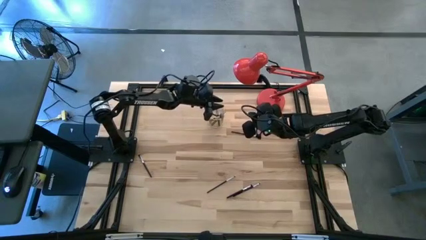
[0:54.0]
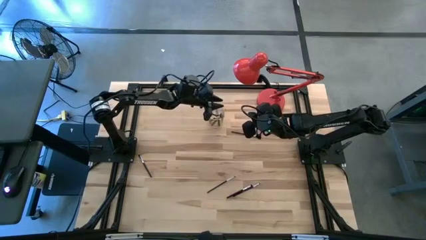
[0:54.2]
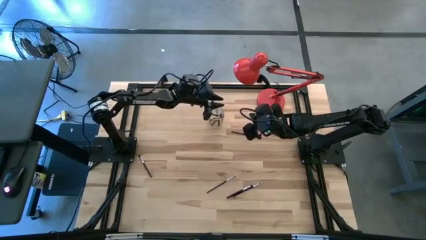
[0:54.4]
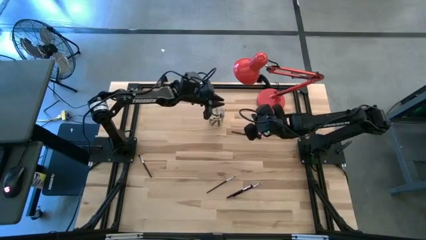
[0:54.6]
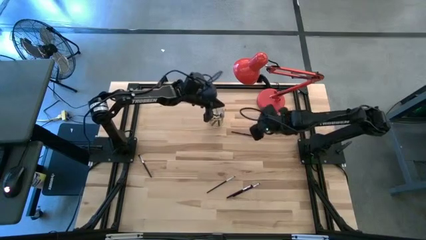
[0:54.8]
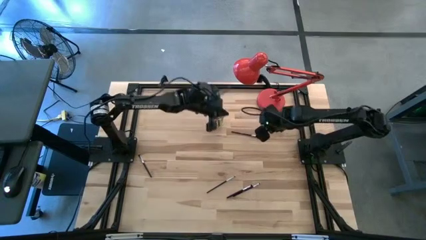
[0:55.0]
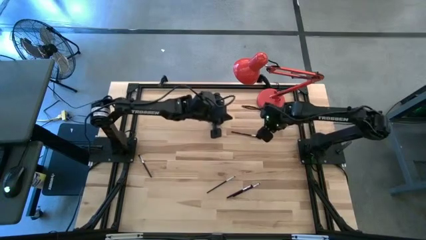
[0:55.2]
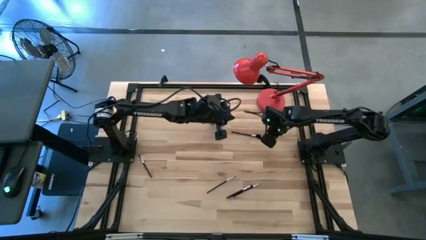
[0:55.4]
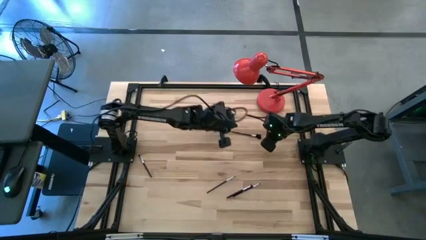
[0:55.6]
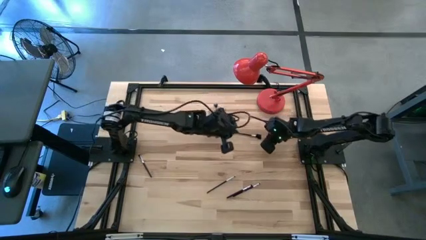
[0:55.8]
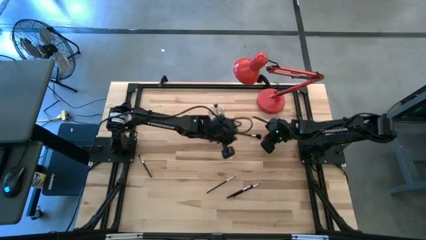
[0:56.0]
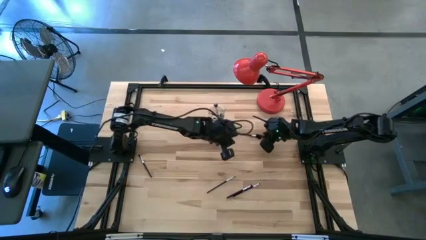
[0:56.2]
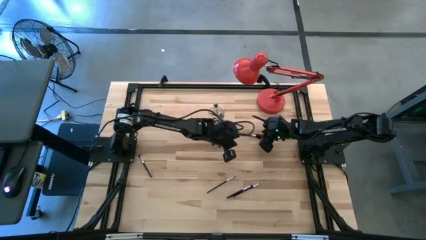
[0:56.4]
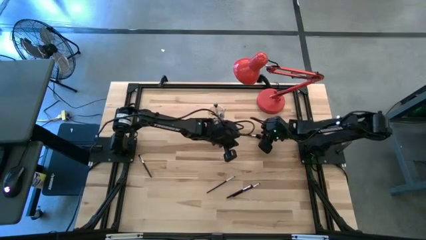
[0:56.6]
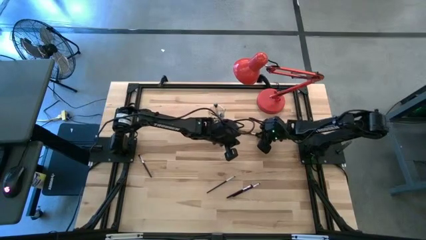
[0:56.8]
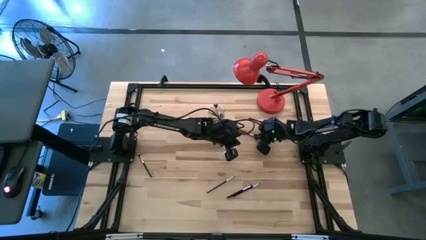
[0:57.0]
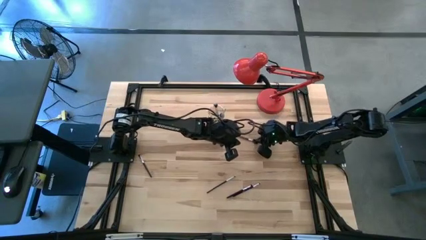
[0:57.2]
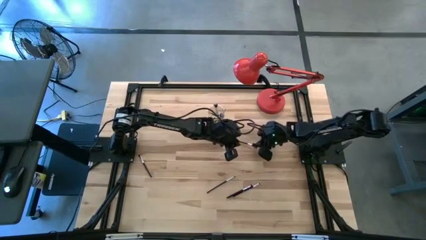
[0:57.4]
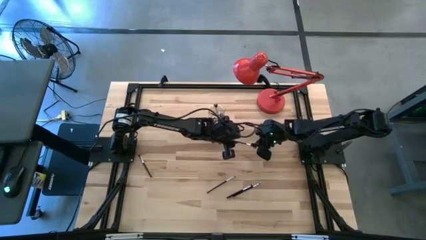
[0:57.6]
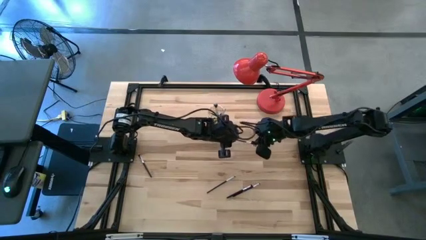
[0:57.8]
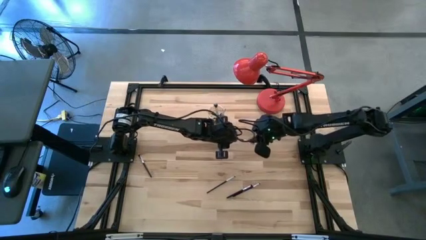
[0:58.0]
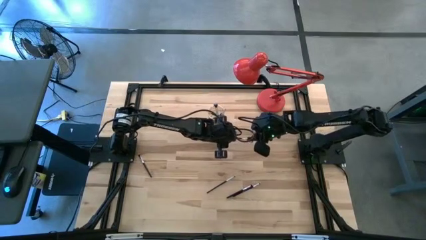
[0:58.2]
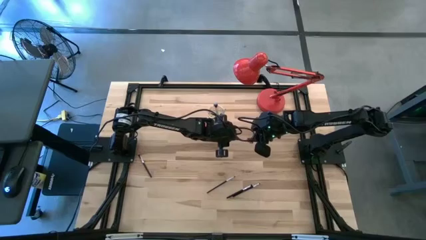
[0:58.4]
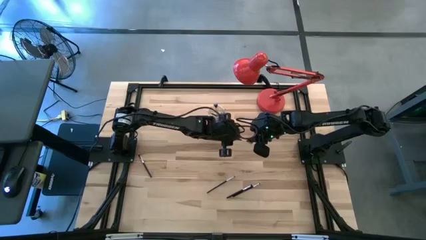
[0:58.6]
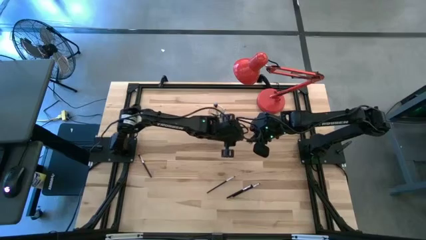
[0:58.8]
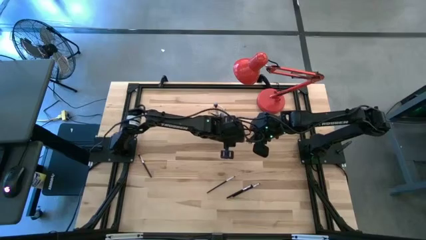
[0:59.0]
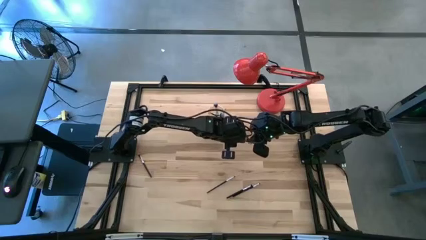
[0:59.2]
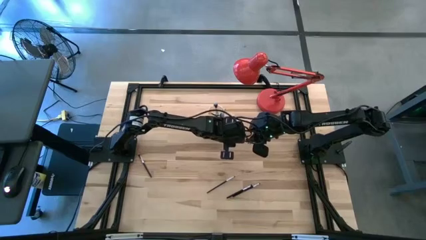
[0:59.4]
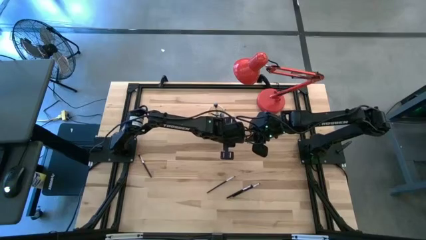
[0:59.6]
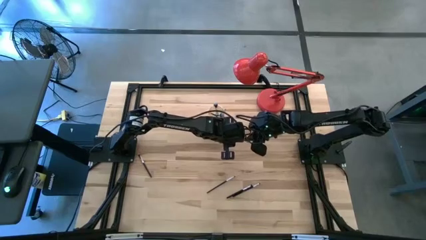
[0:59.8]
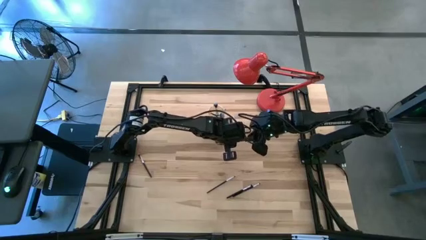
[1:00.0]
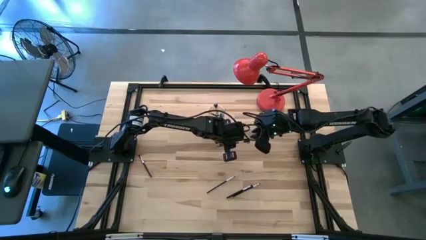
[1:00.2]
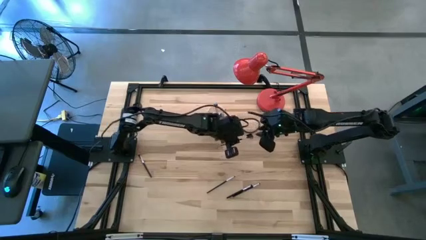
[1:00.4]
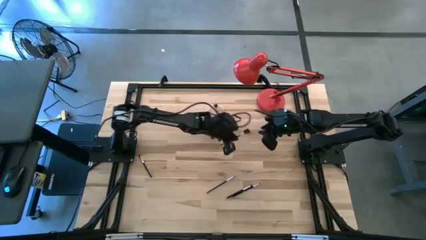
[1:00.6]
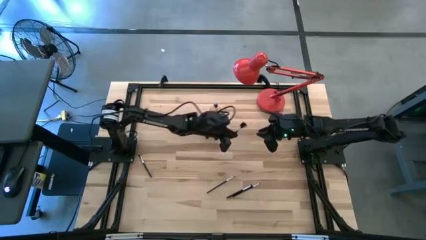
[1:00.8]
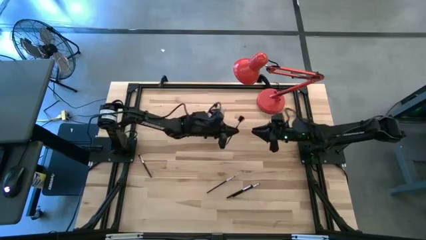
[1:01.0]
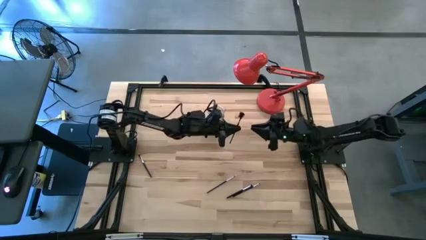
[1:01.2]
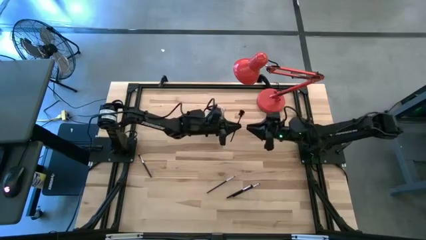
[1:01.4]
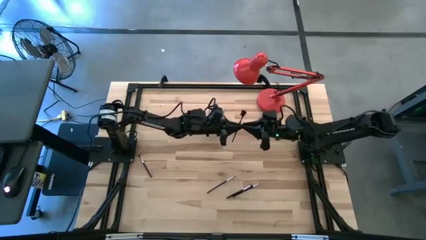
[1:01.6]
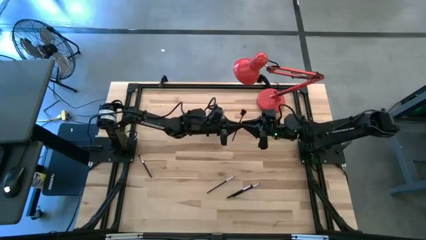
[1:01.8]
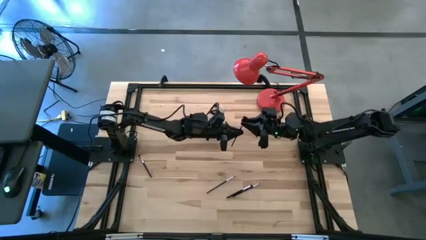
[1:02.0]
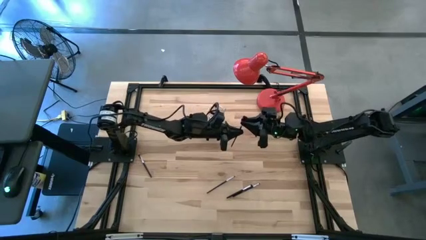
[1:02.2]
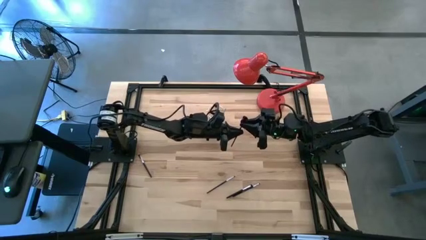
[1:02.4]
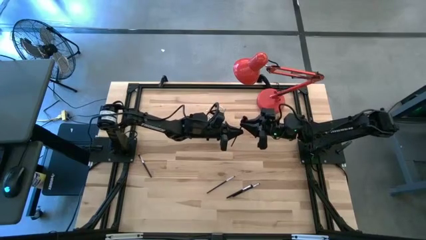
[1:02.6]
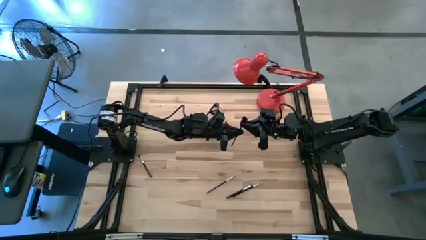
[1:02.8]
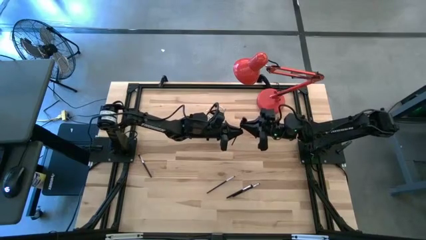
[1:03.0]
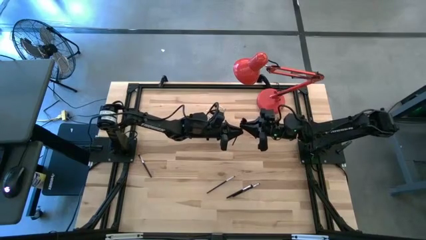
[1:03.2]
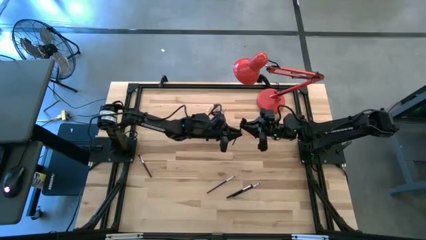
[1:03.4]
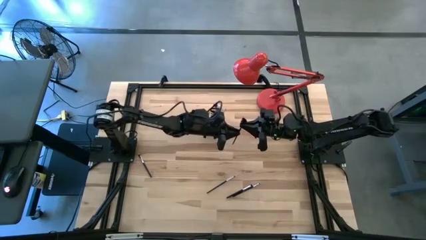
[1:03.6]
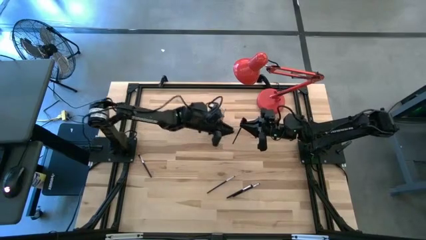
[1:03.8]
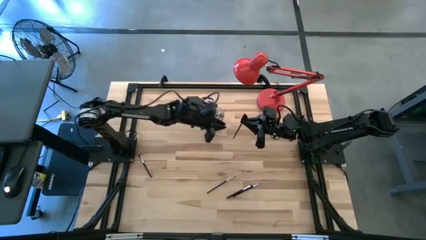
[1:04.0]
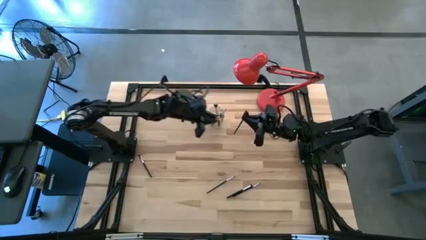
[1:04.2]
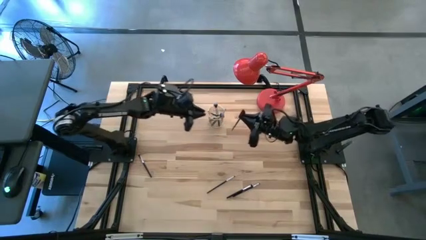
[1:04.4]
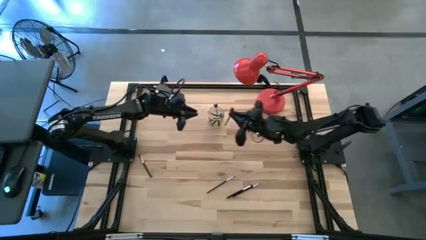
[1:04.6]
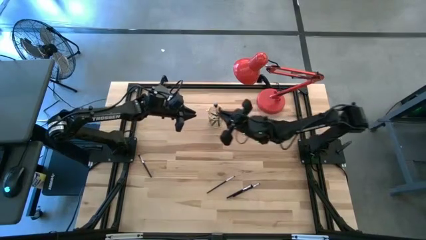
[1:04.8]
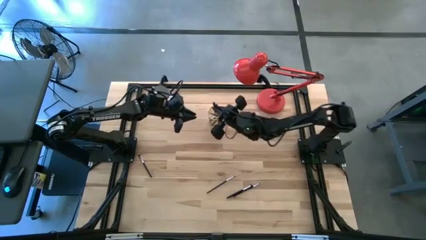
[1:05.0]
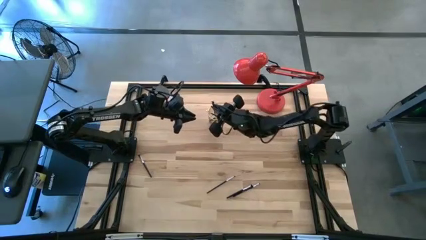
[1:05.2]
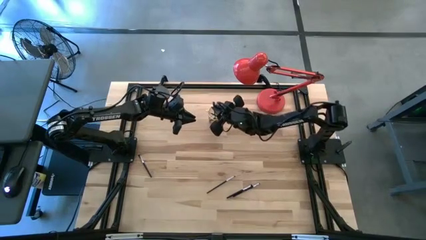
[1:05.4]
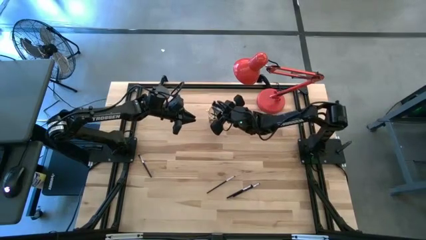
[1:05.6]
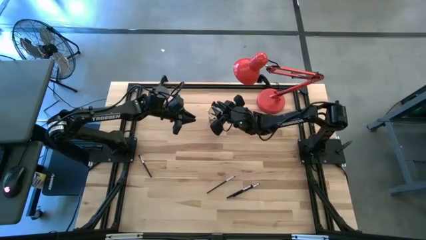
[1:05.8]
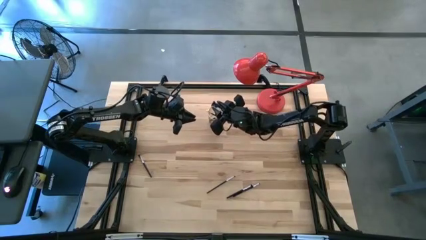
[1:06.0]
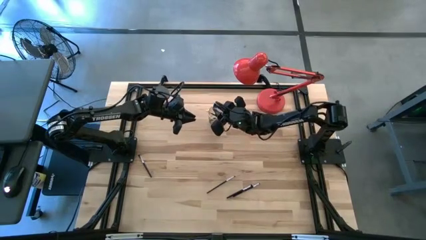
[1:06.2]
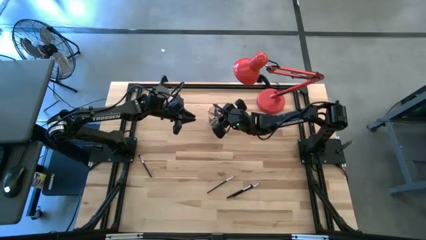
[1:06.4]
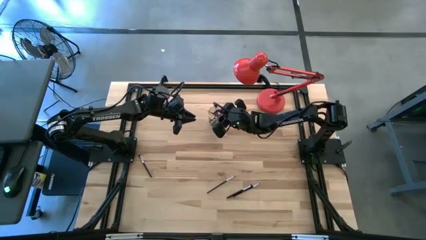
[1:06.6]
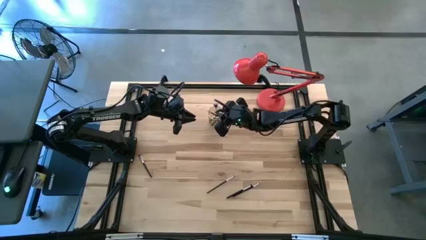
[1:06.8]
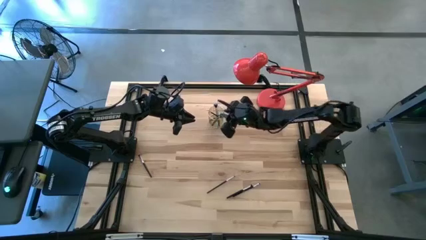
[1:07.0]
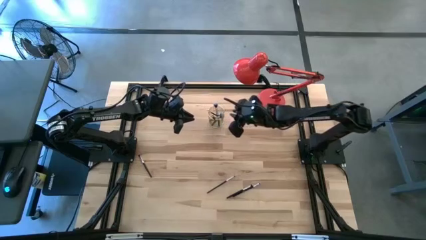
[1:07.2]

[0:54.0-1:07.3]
Task: Pick & Place Makeup Brushes
Put the eye groomer brush into the makeup brush holder

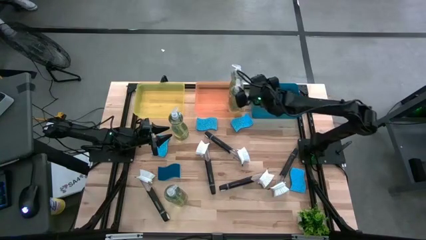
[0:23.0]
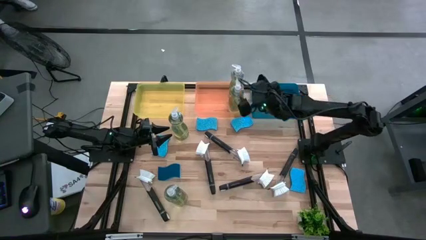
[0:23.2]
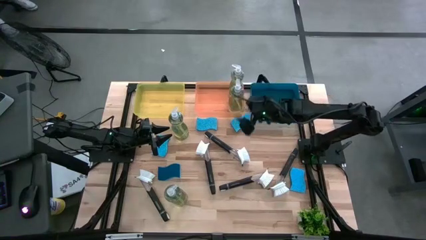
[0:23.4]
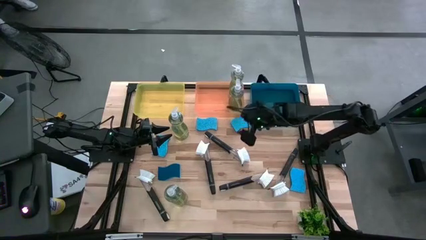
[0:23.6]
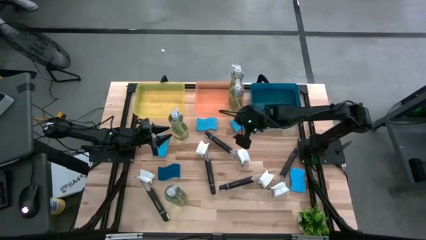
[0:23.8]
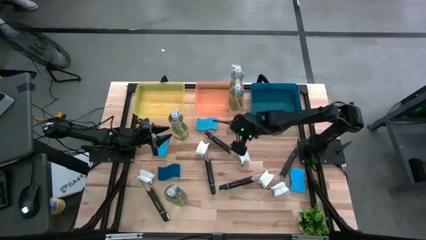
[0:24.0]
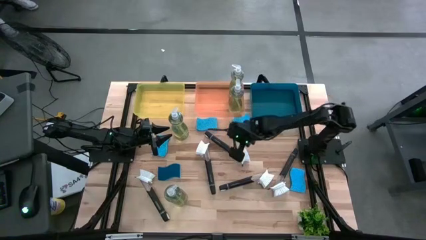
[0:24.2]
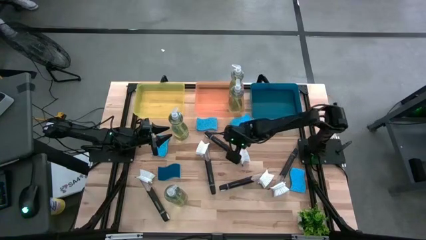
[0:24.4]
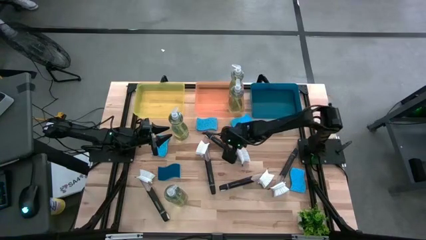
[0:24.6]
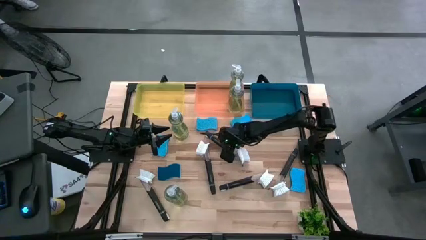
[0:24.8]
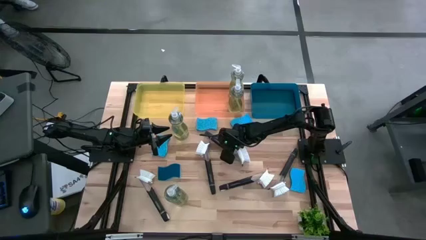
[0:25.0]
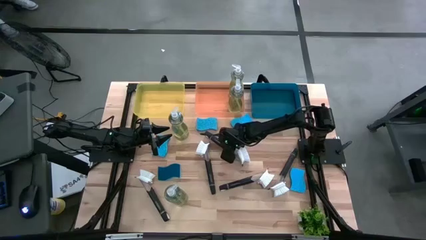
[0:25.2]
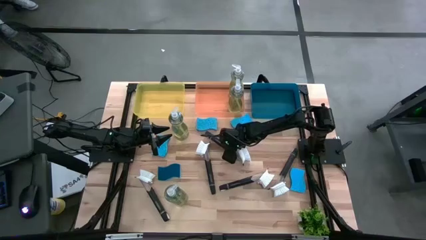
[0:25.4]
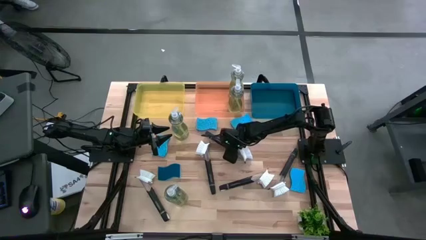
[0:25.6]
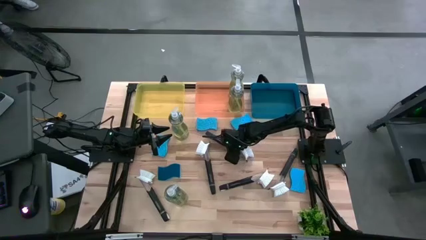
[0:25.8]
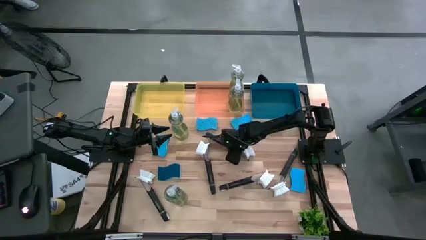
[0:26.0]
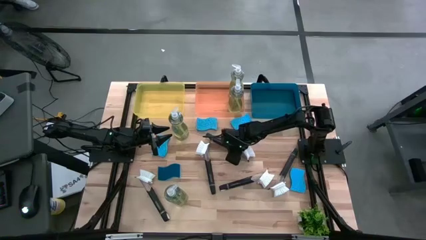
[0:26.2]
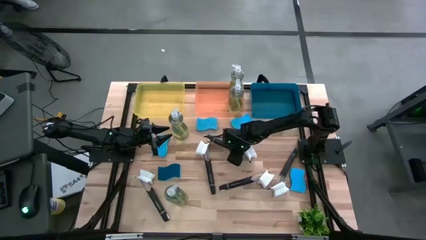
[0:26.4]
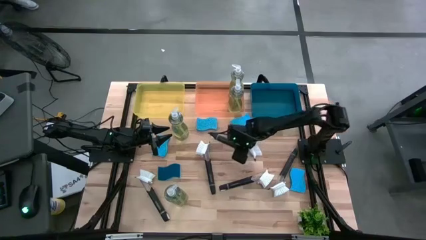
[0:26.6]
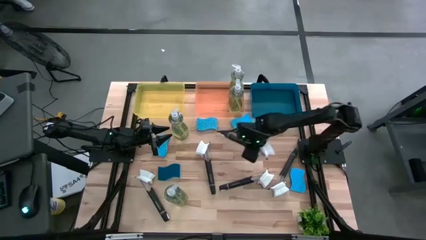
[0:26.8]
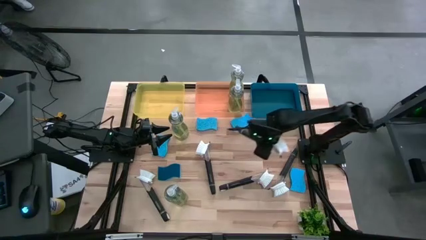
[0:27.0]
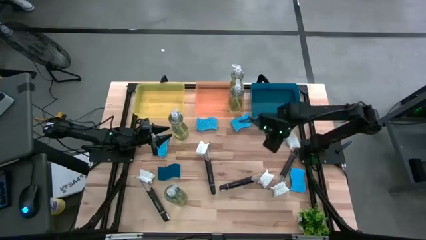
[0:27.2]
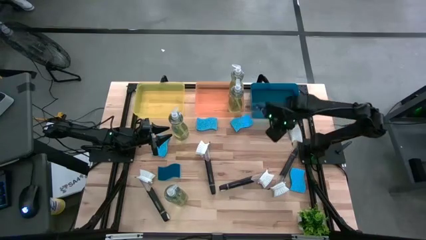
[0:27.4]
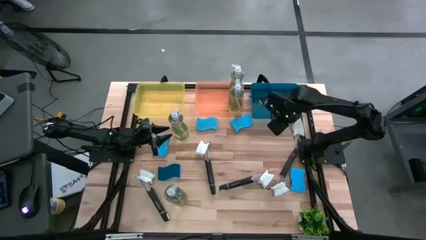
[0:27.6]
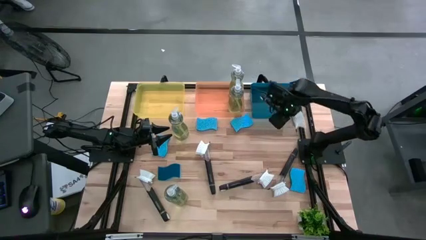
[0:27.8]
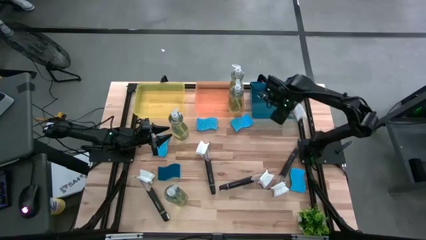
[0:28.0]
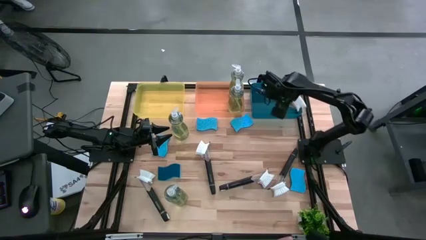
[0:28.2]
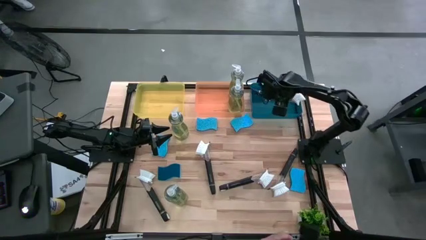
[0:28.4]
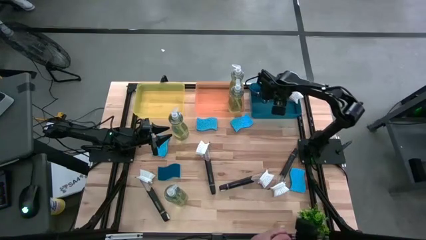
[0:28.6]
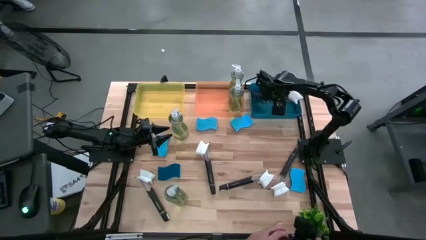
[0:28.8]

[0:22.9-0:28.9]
Task: Pick & Place Kitchen Sink Supplies
Put the black dish brush into the blue bin
